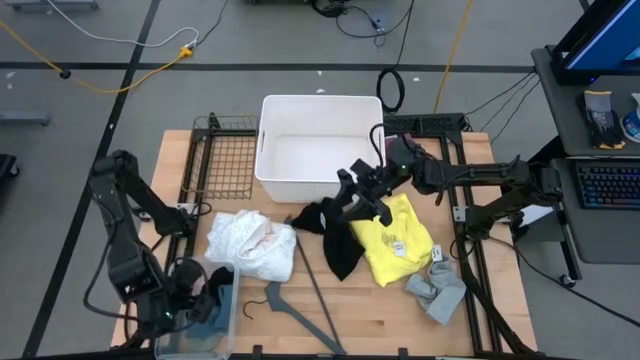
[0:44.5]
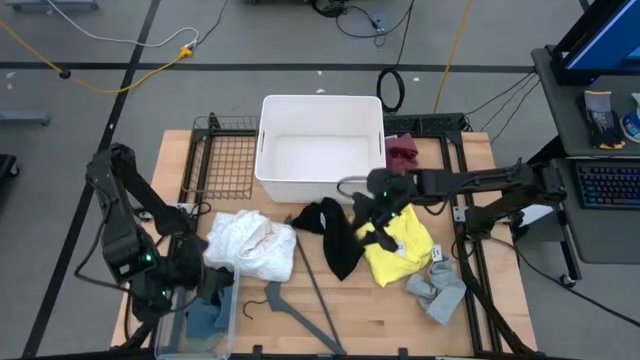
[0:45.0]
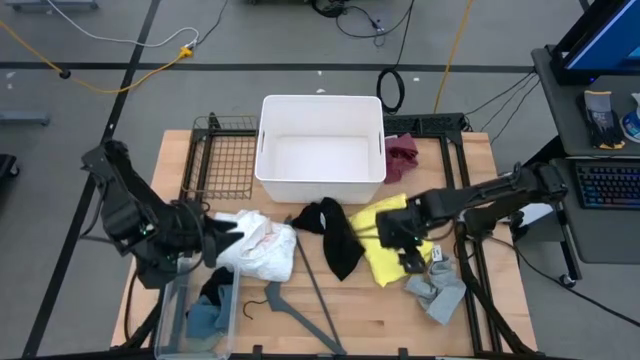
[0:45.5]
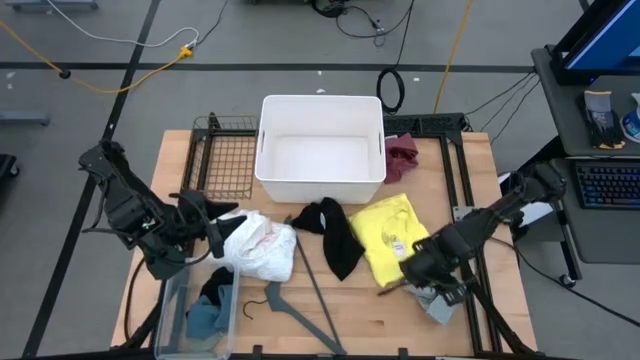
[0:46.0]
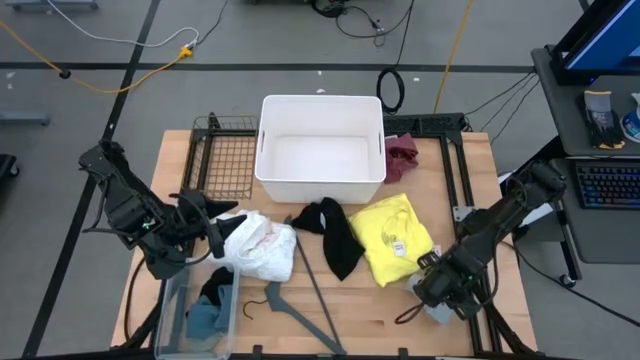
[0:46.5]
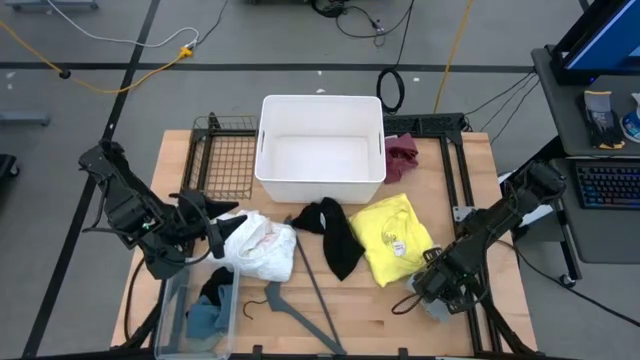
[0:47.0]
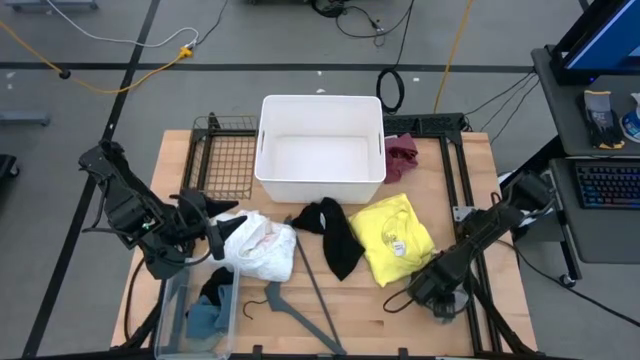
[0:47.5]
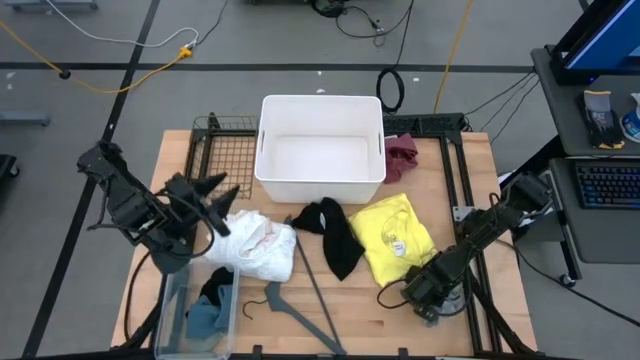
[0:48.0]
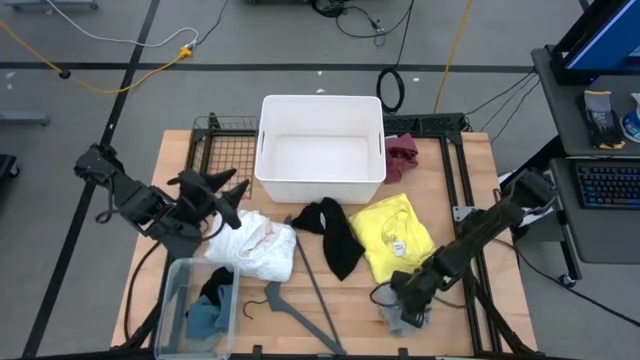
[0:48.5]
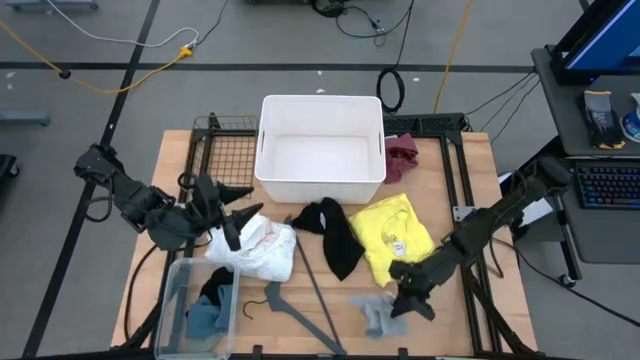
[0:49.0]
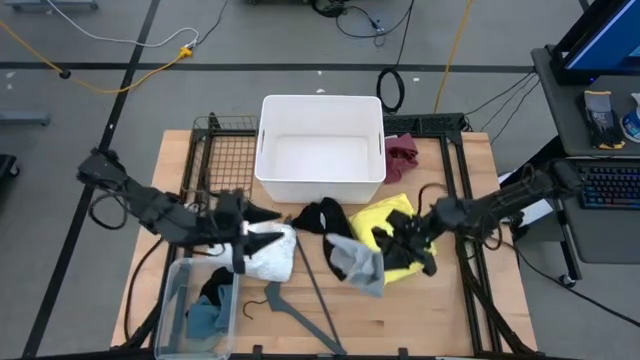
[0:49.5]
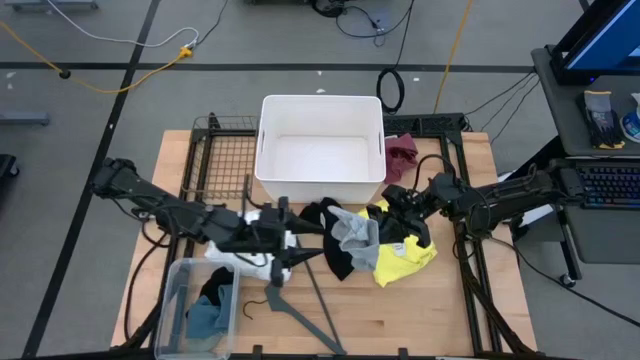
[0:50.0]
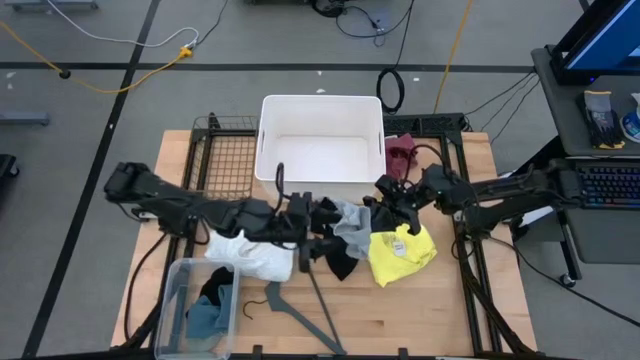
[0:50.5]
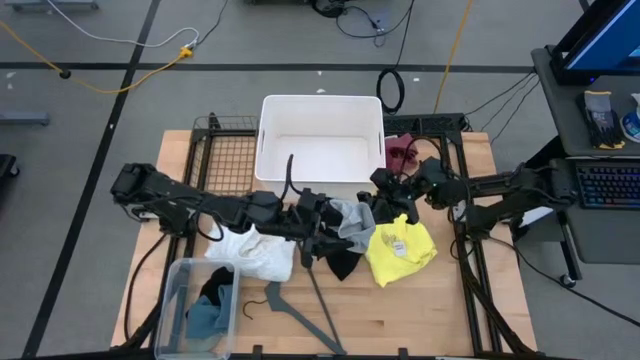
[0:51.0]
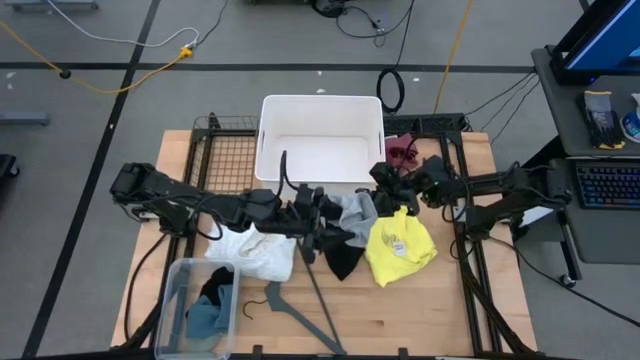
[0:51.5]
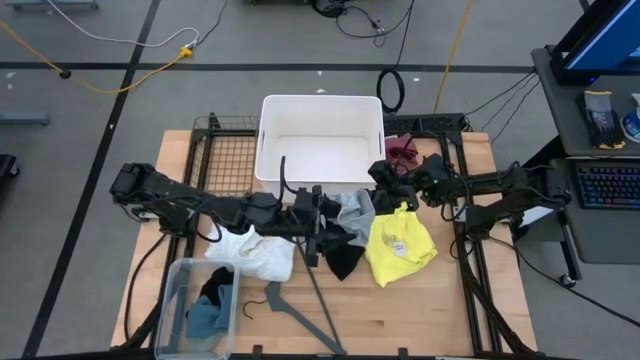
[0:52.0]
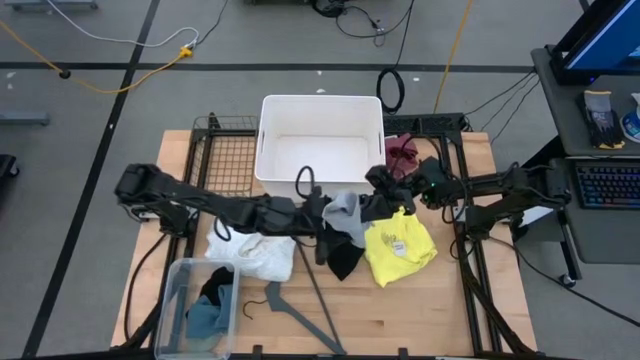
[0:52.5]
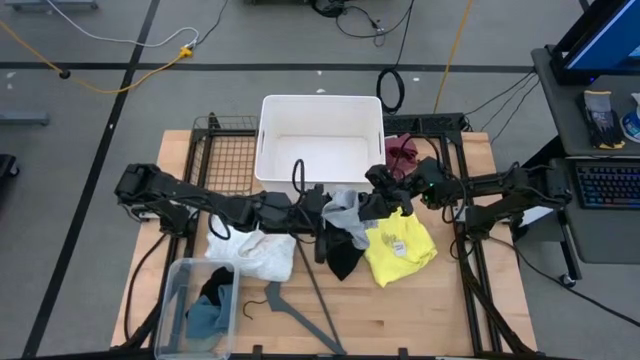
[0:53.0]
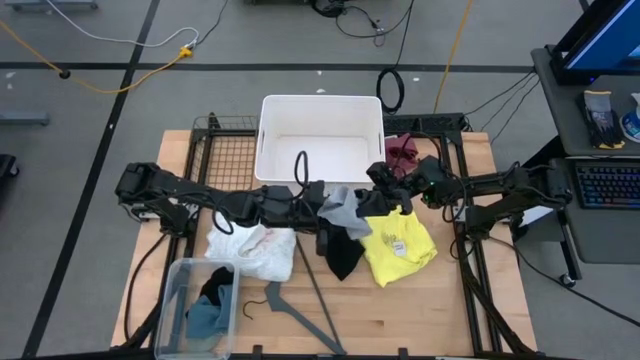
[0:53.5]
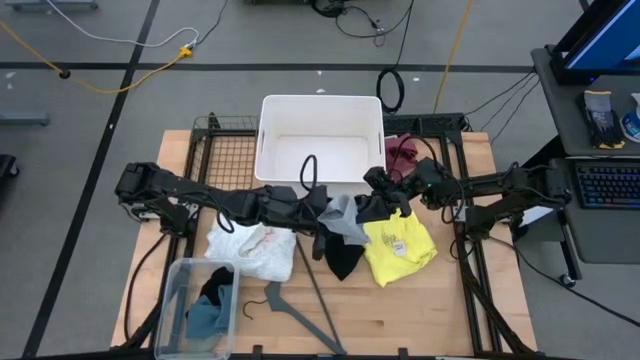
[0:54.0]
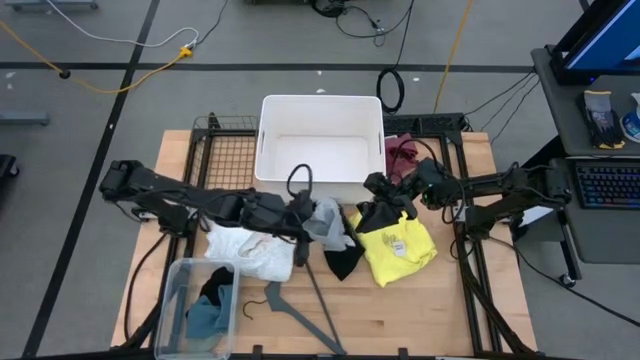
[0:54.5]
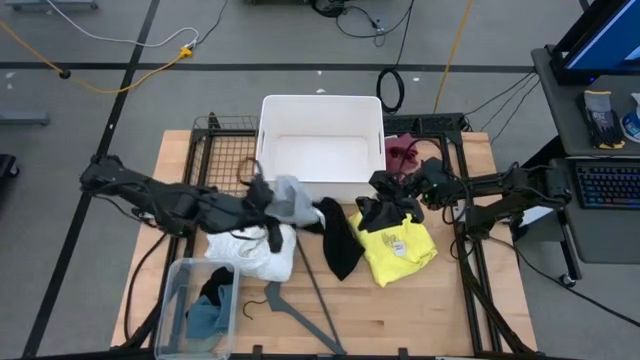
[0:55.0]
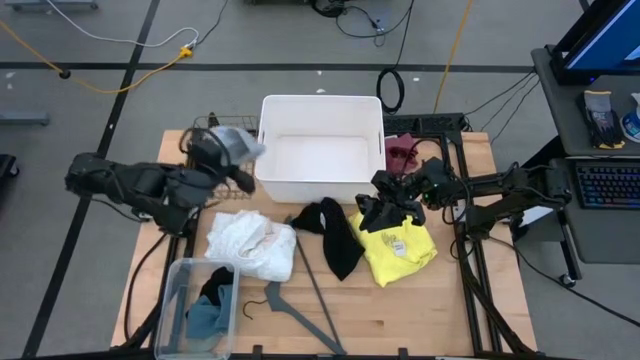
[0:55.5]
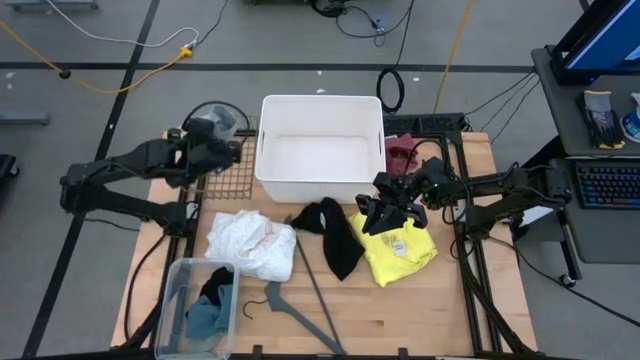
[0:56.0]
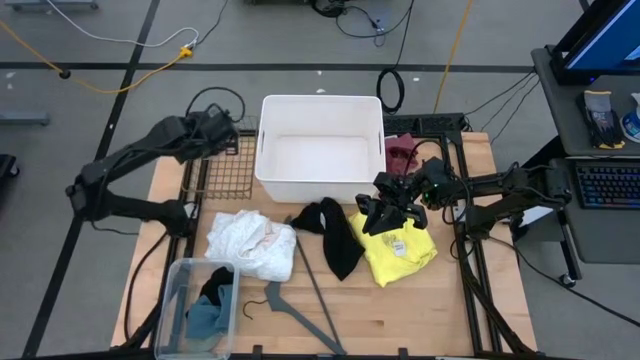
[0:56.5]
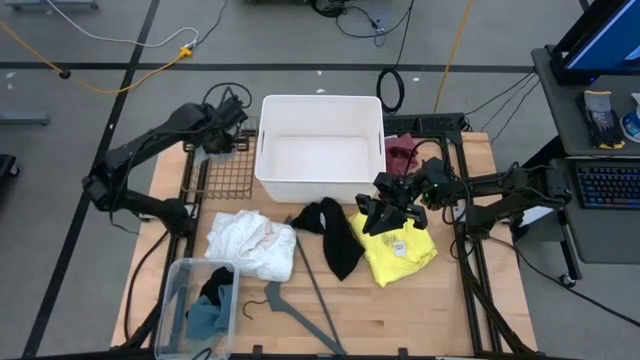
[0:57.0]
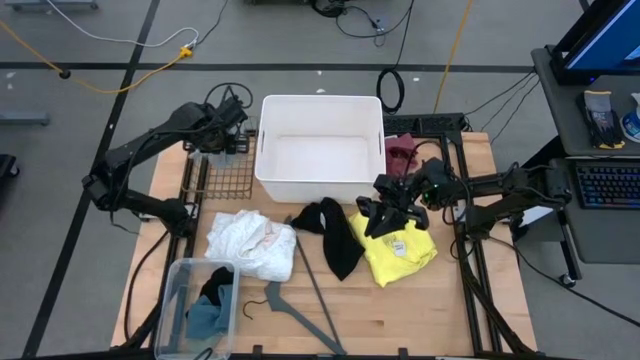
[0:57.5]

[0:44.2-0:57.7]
Task: Pick & Place Cloths
Put the gray underwear into the black wire basket

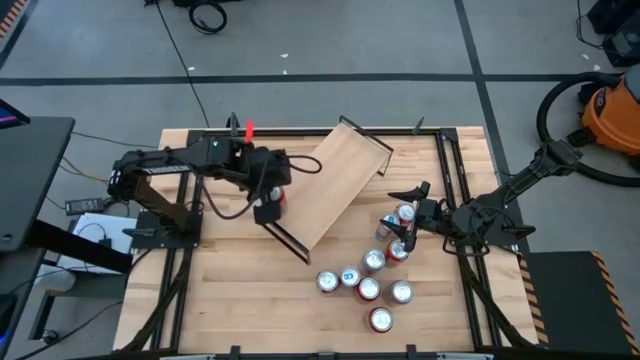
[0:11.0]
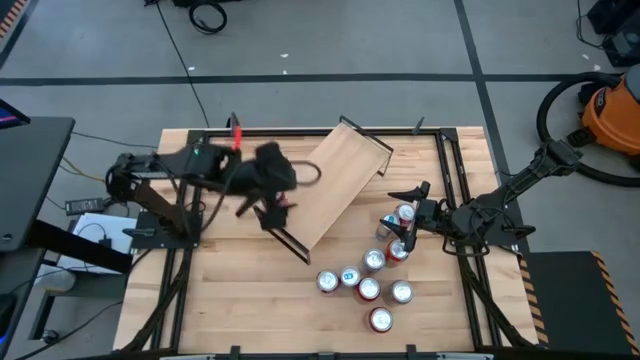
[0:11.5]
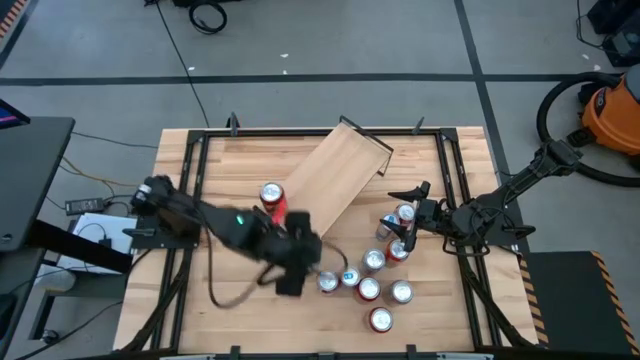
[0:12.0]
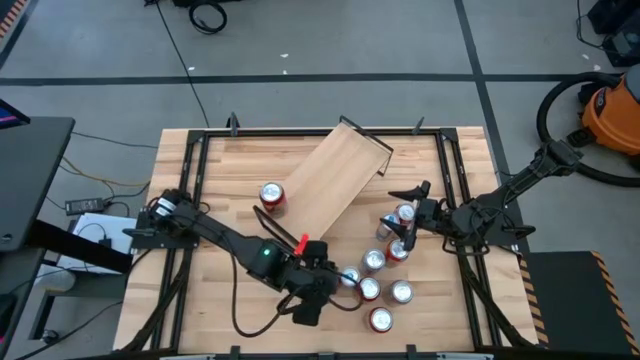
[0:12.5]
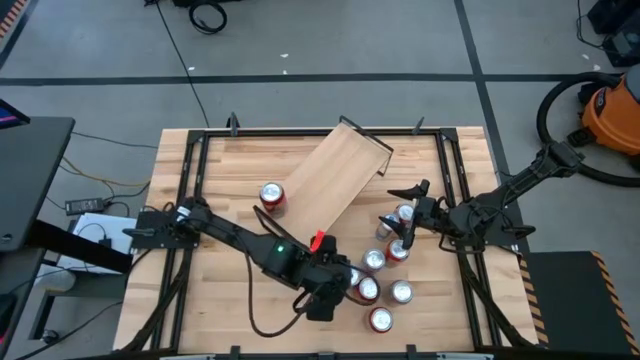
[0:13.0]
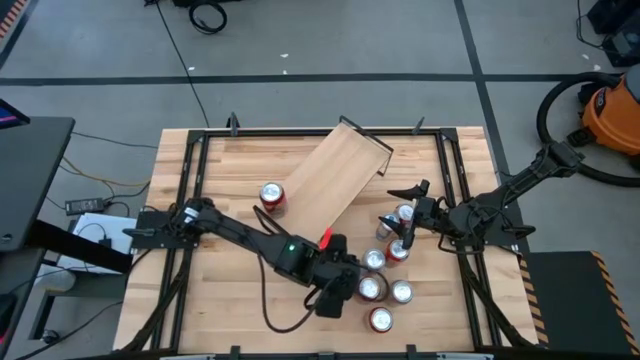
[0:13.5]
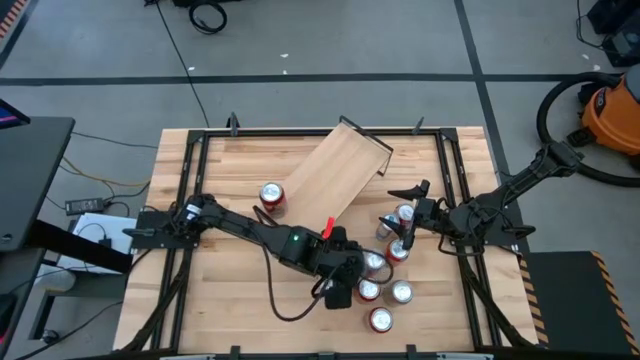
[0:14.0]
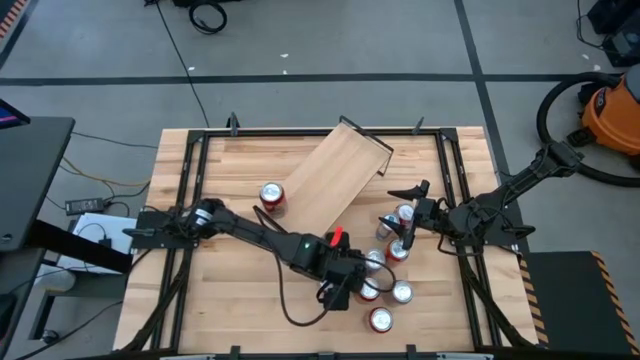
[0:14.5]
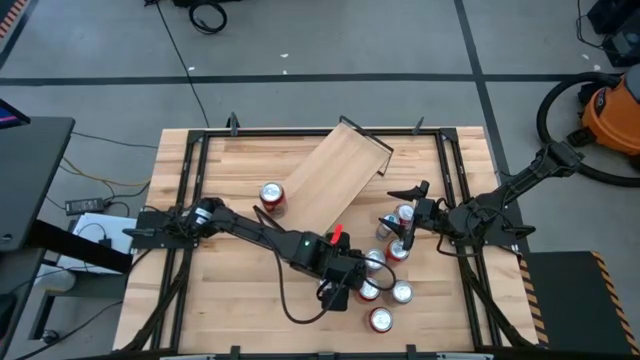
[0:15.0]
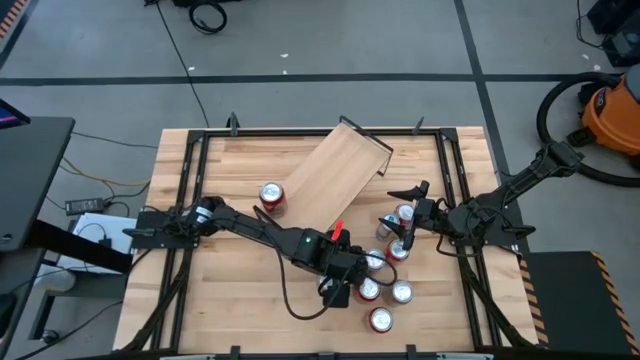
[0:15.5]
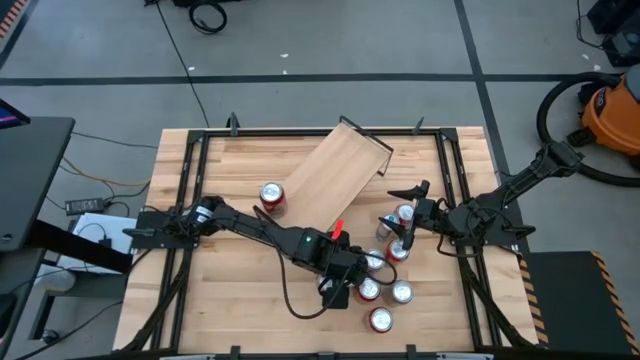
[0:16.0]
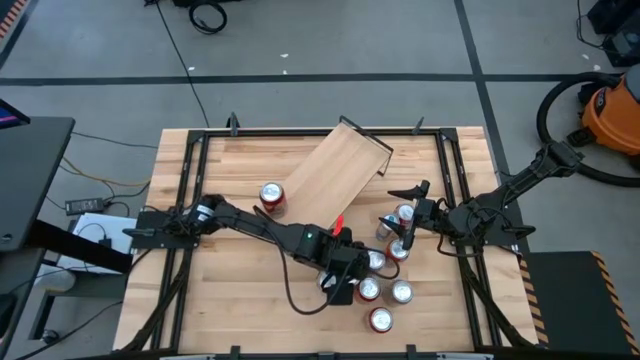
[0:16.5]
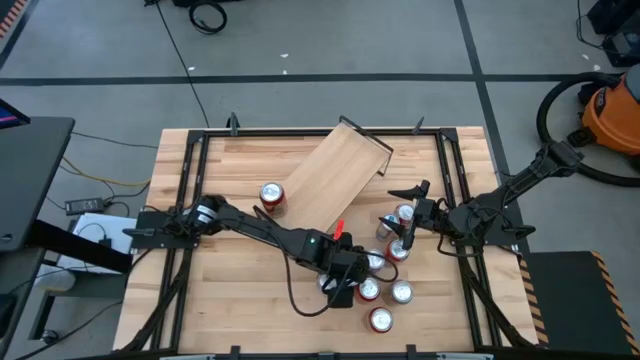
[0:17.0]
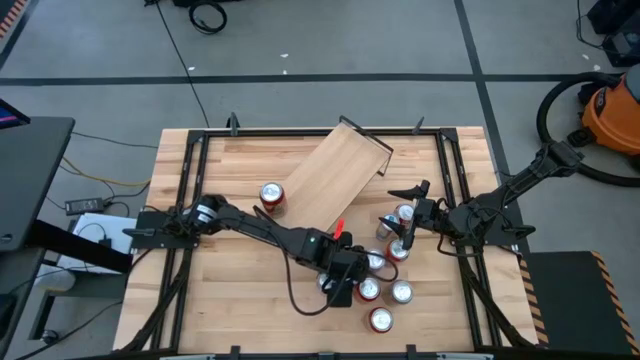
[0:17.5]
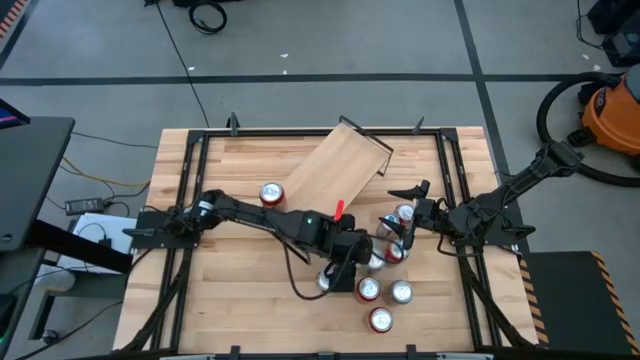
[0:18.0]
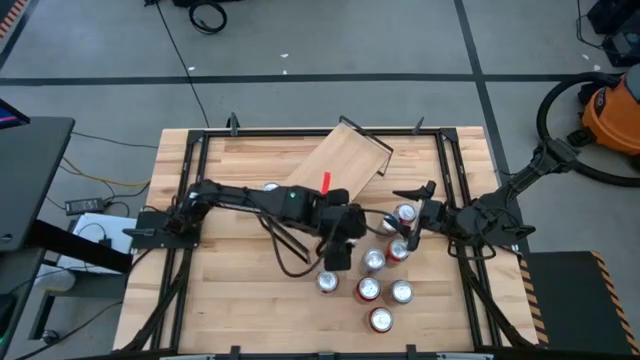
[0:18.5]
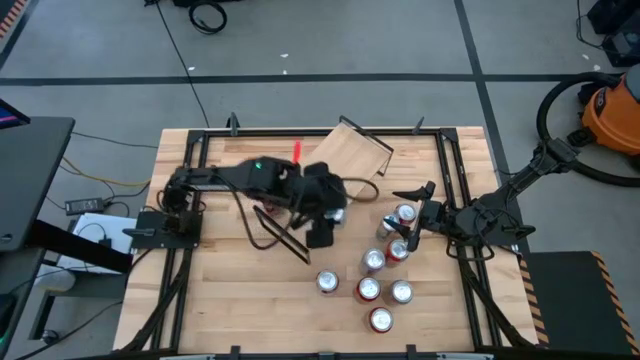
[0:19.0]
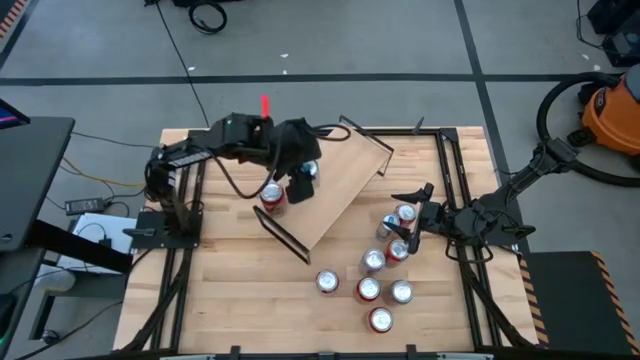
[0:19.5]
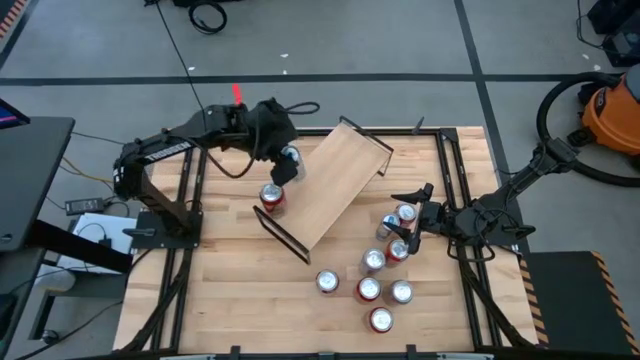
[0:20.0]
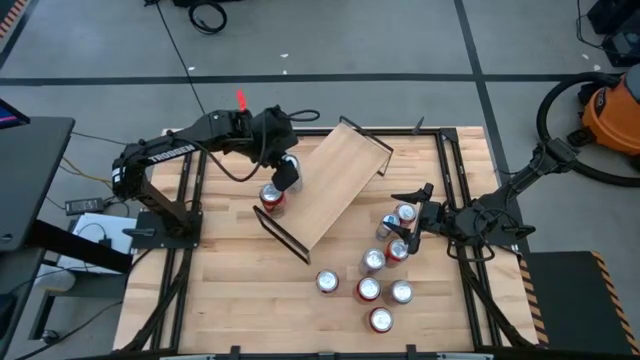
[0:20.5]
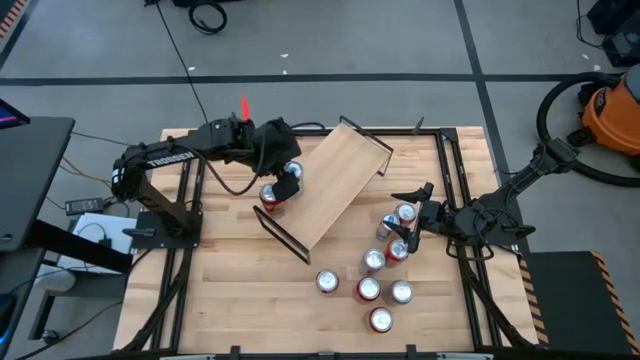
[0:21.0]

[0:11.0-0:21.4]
Task: Place canned beverage on shelf
Put the bottom blue soda can on the shelf
